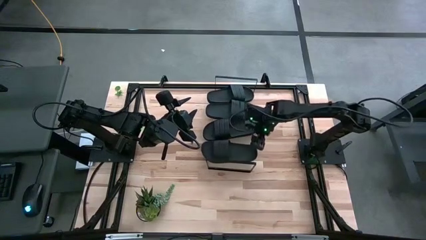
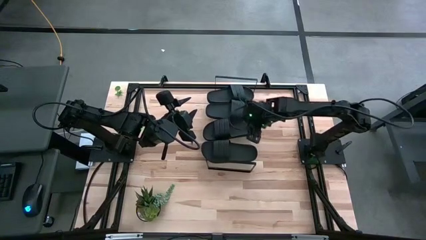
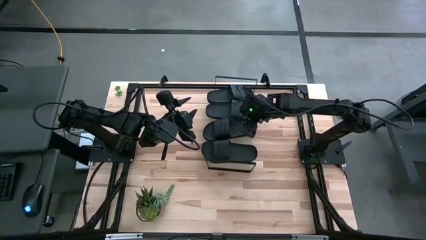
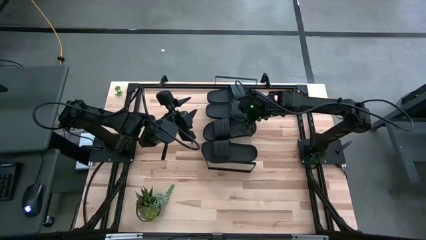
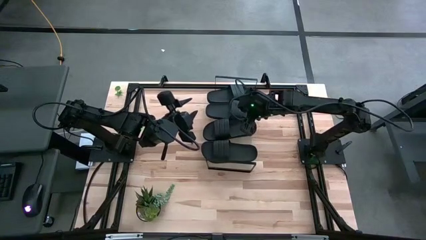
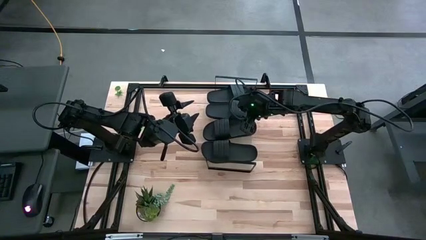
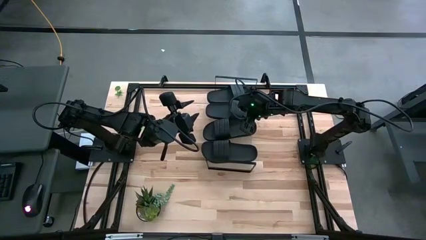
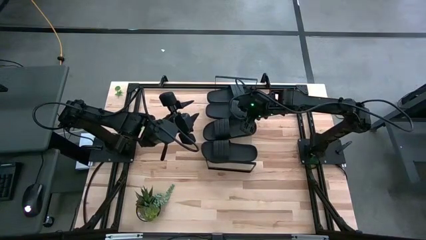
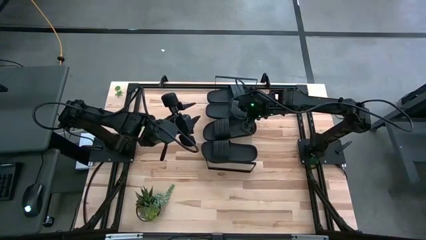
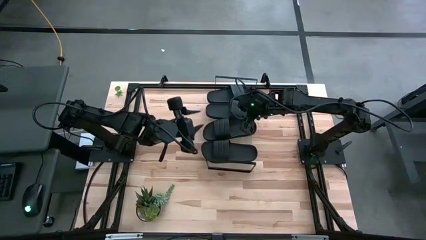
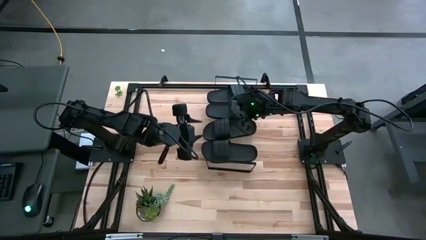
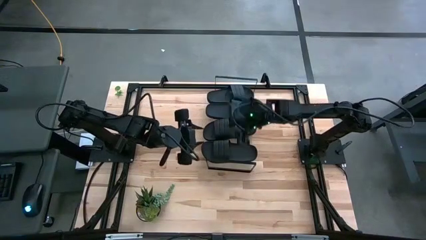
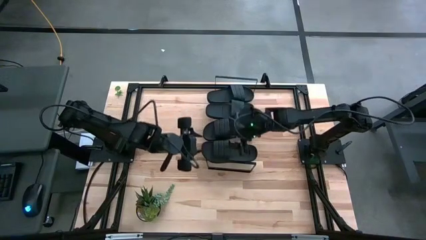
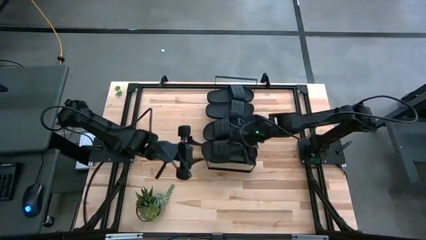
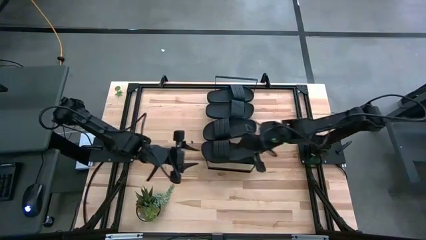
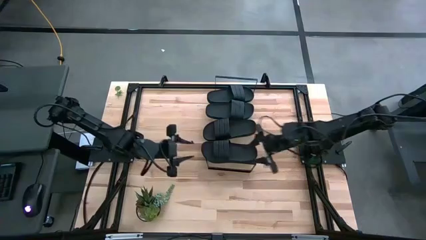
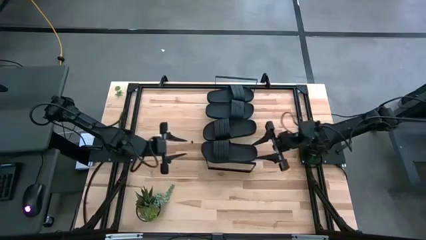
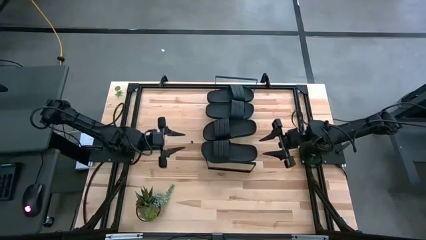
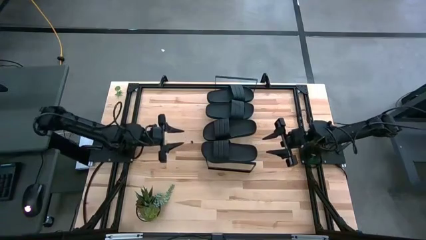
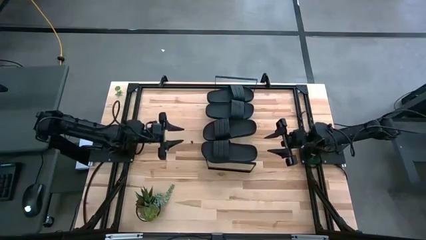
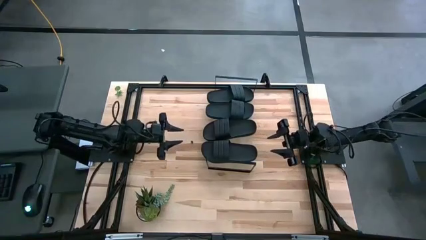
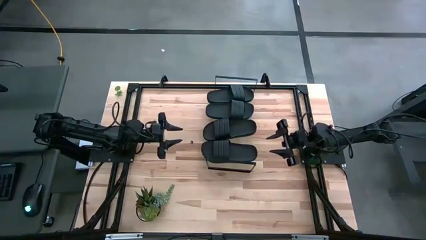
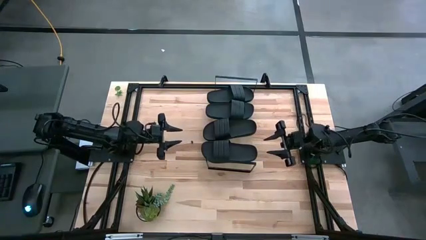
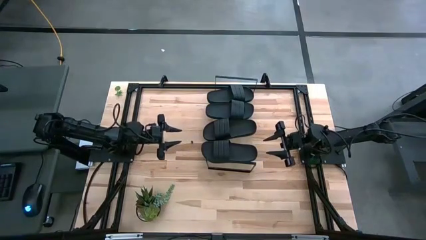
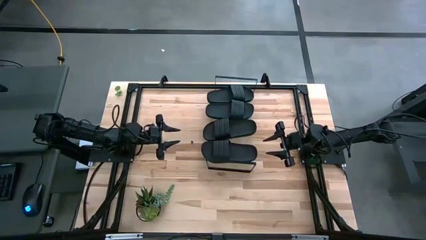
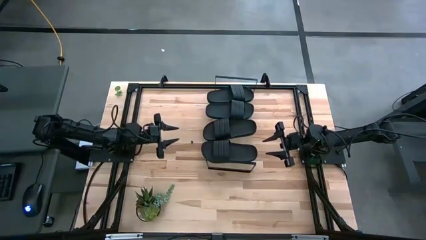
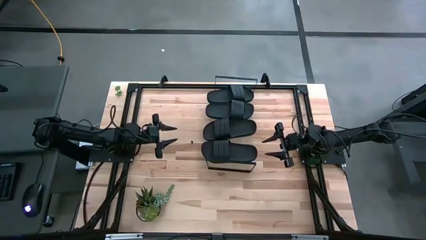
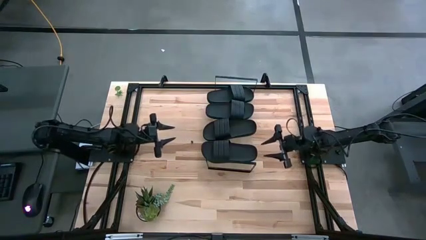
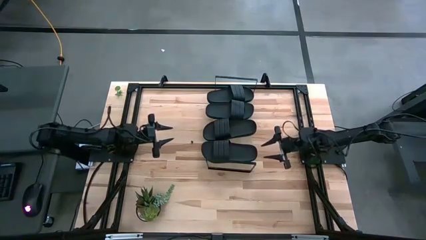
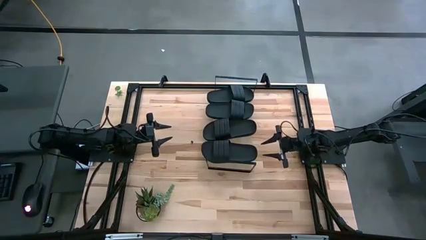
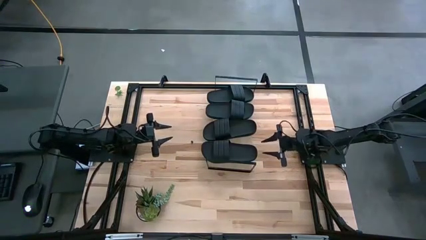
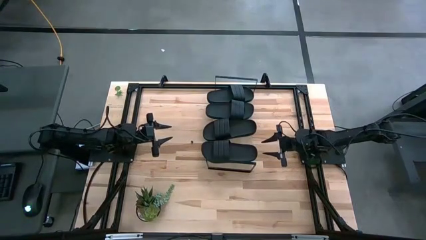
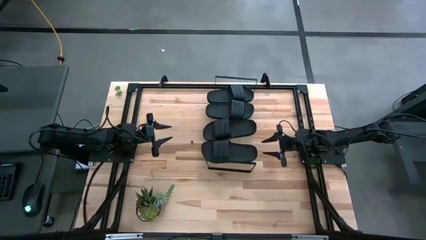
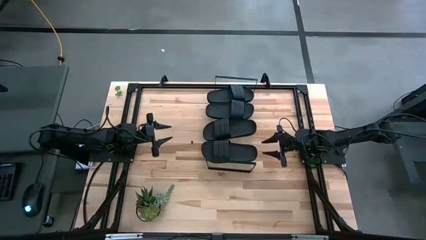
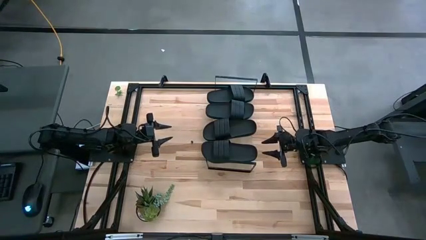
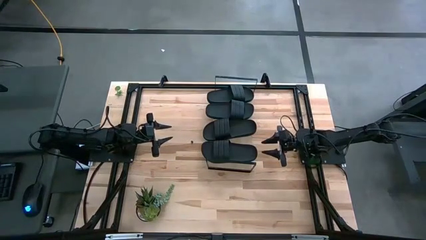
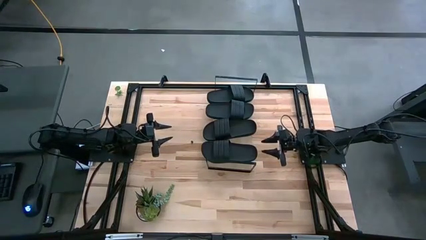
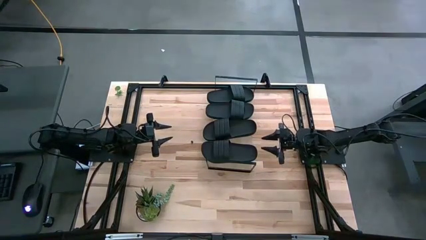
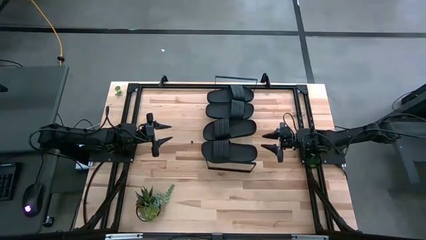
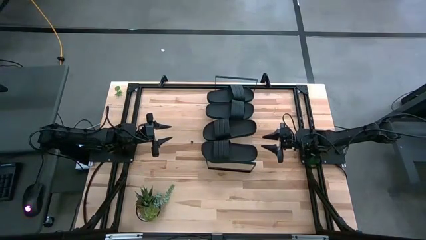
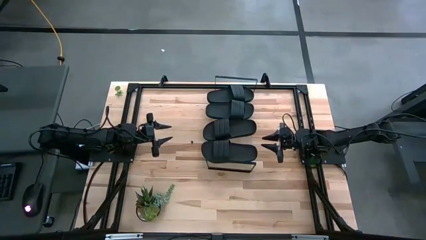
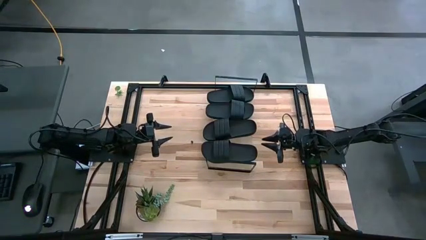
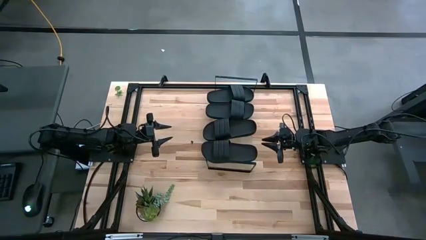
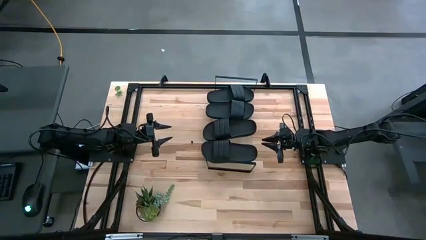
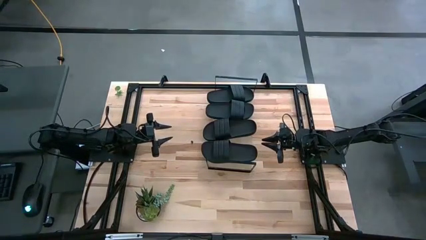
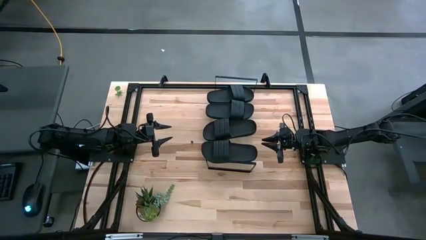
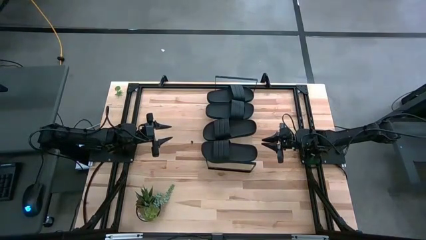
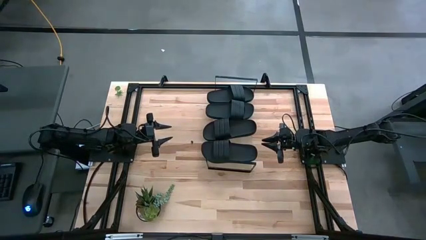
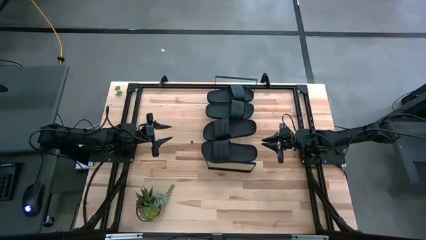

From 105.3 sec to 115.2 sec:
Task: Pick and place slides into the shelf
Return to Home Position

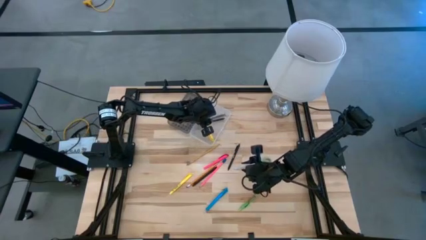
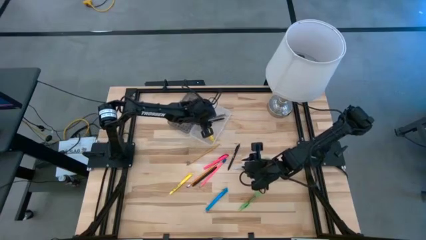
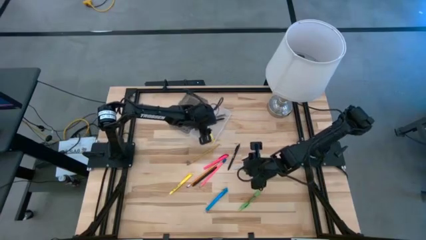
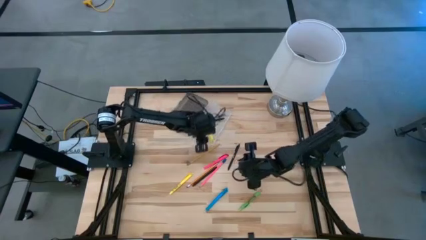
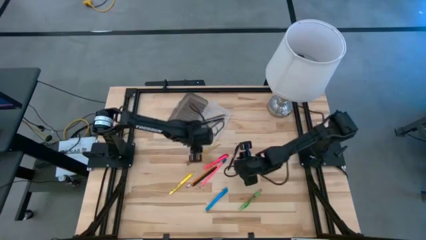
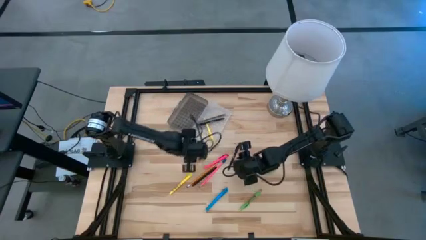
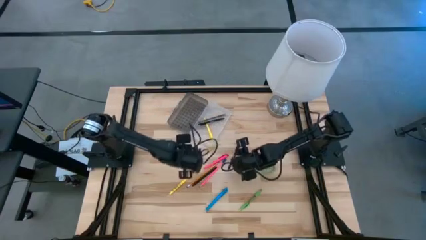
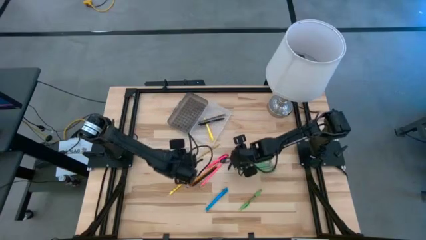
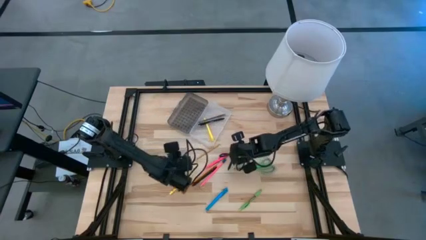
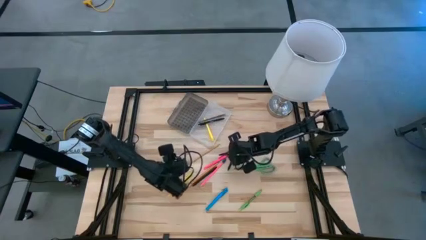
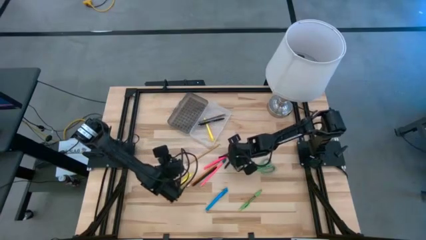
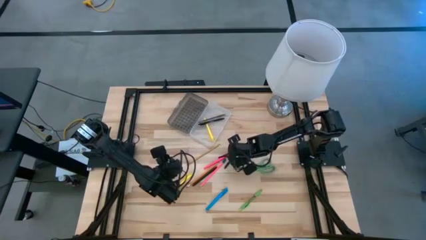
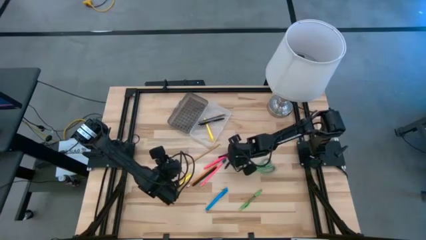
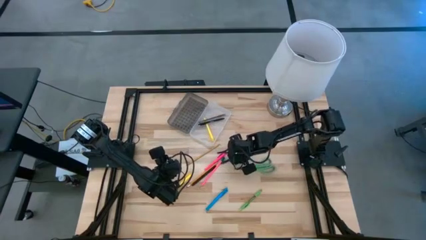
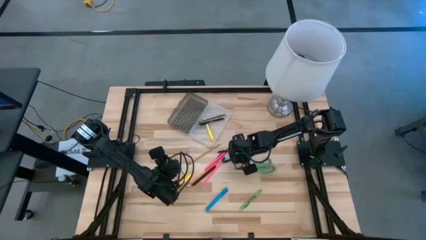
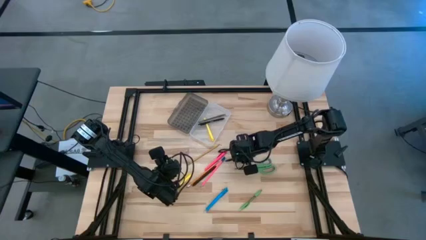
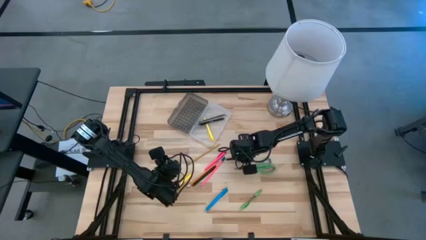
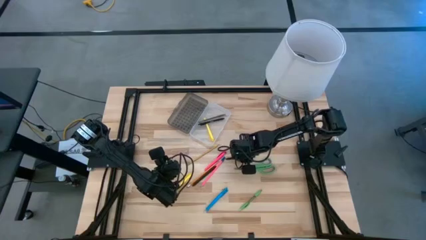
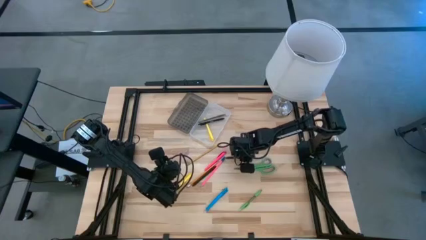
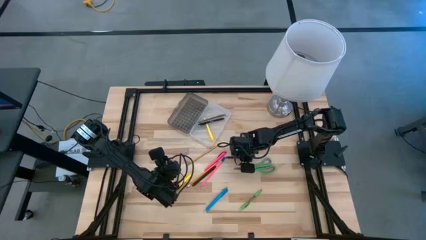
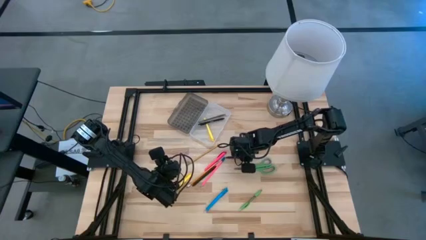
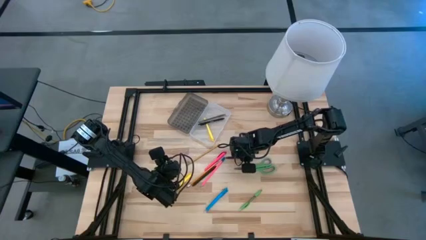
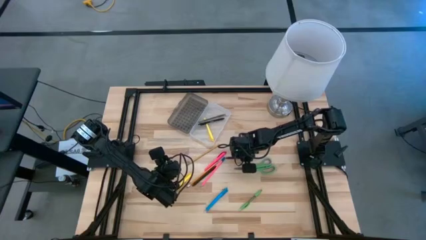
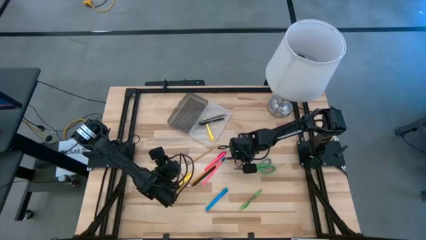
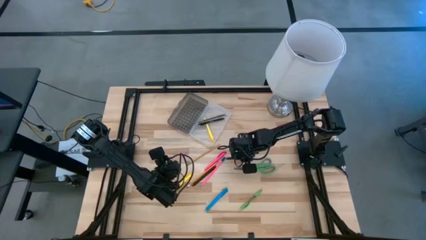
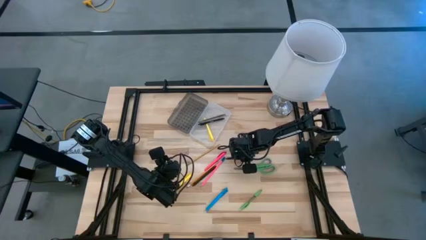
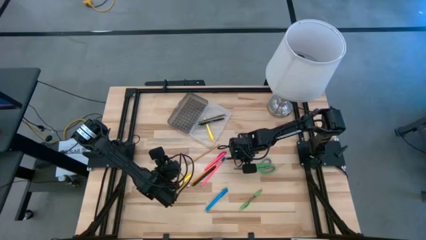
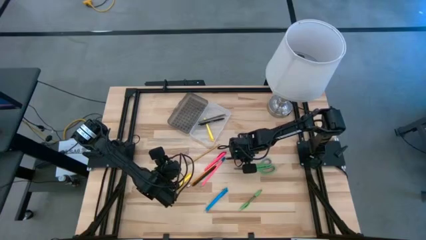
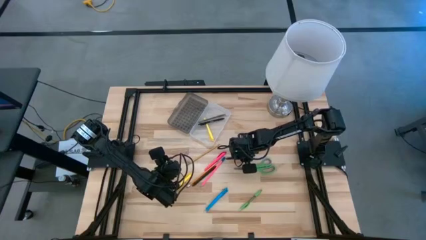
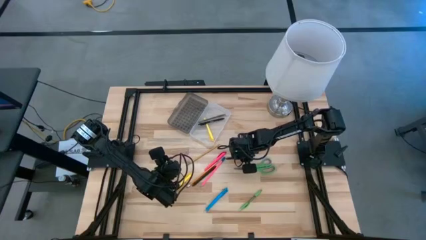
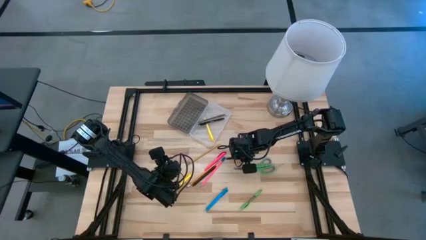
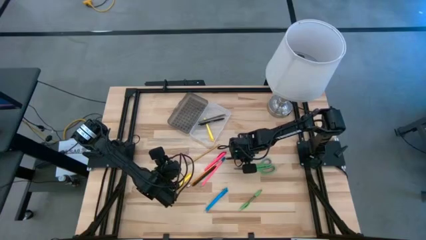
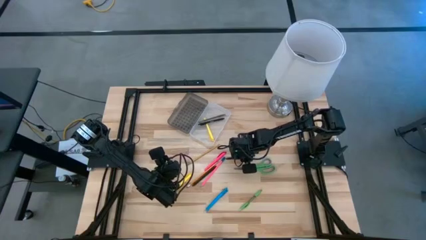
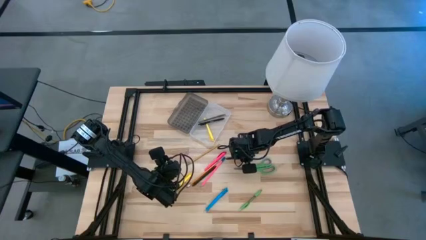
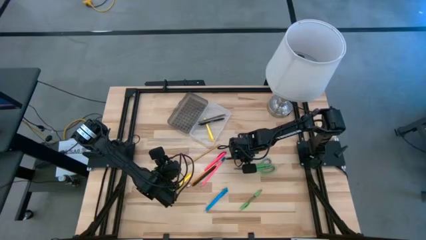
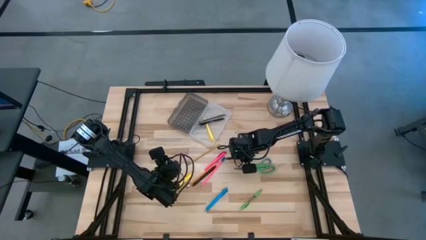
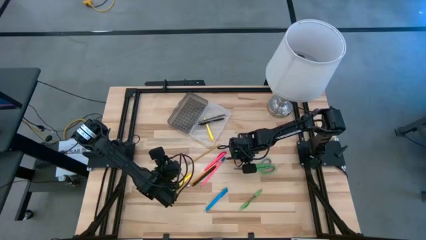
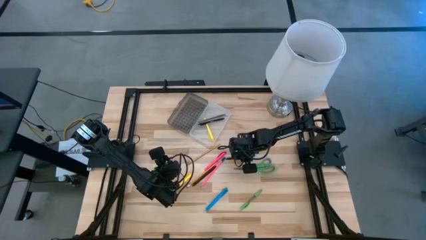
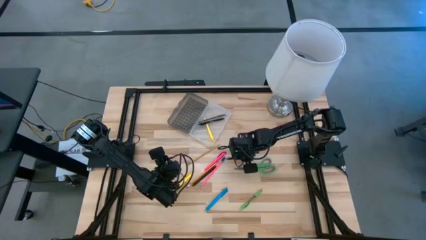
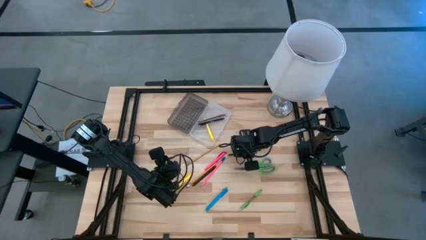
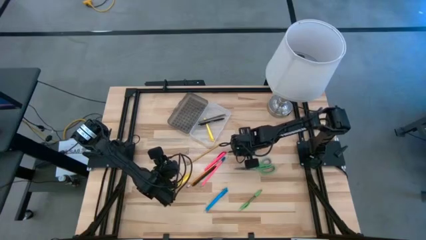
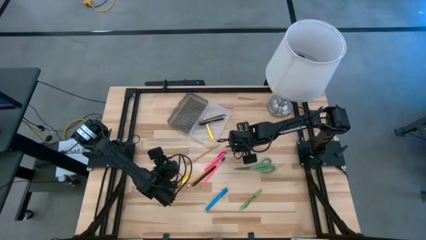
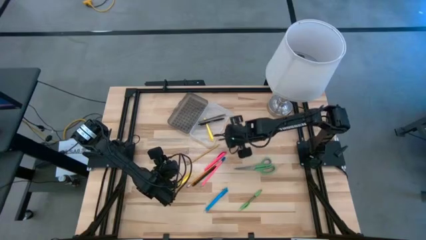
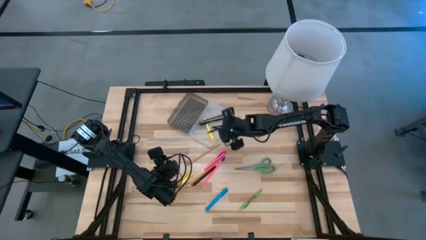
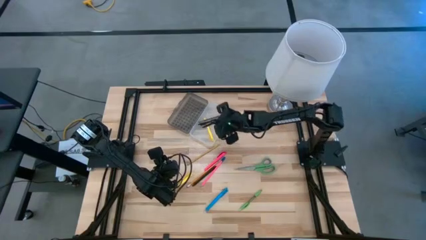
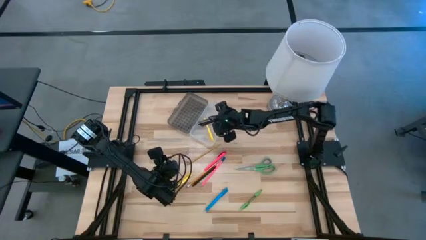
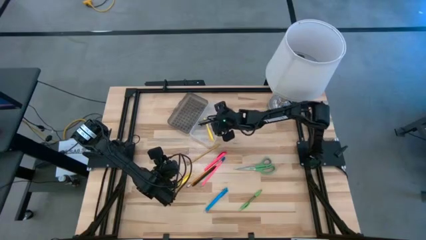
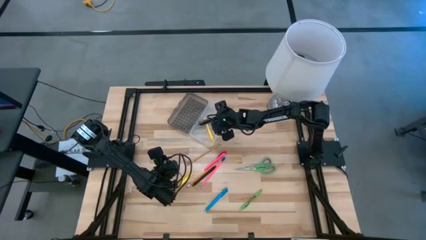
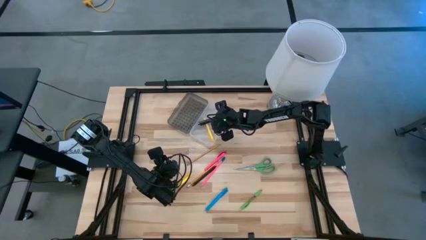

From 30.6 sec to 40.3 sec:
Task: Pick & place school supplies into a supply box
Put the black pen into the supply box
